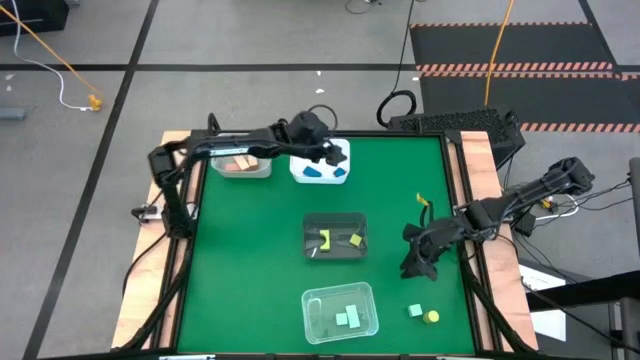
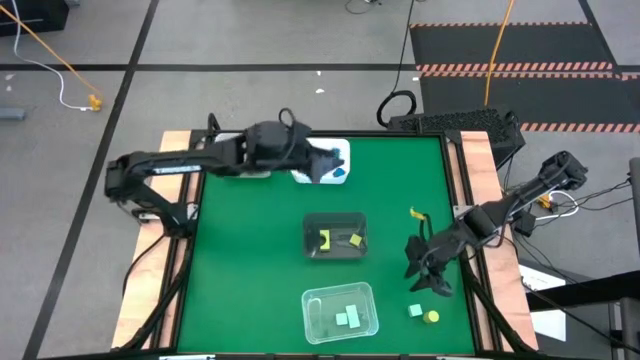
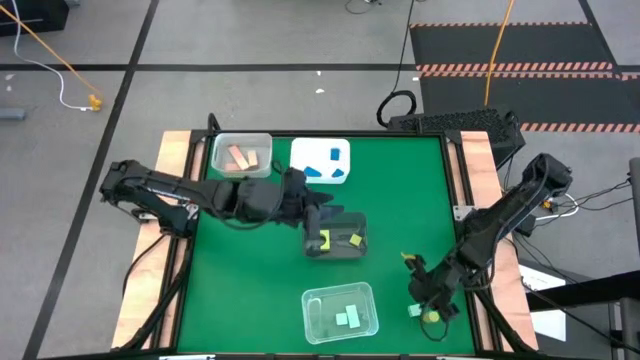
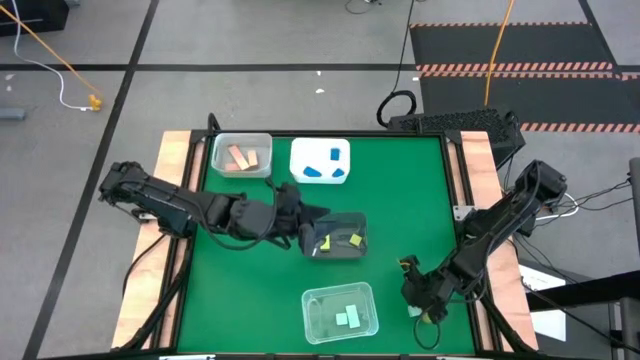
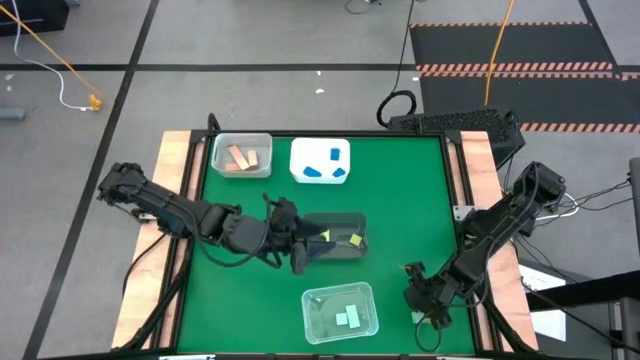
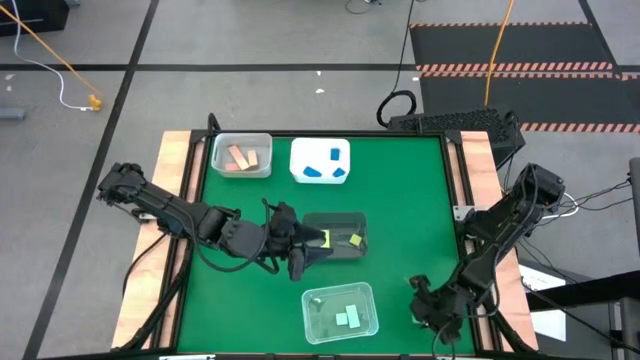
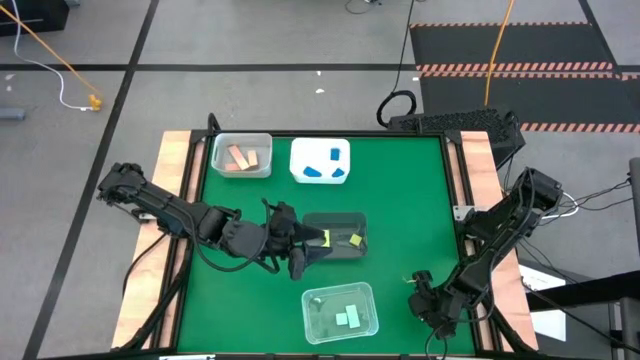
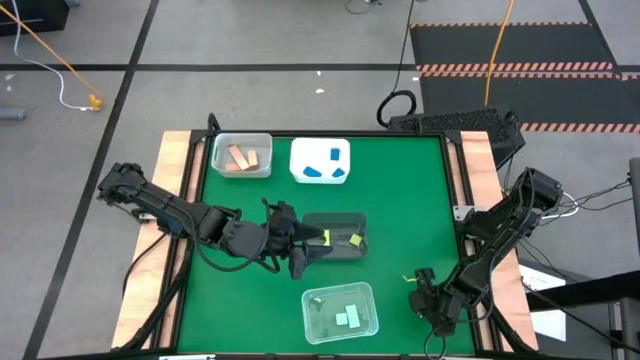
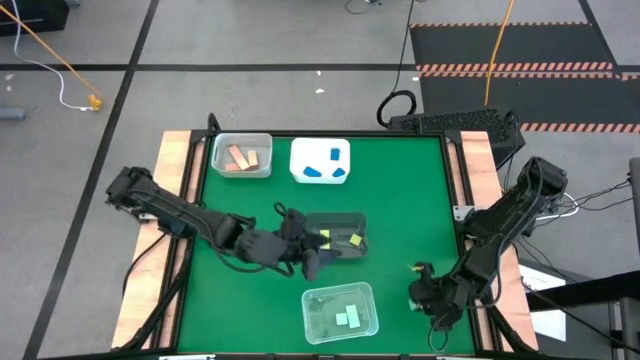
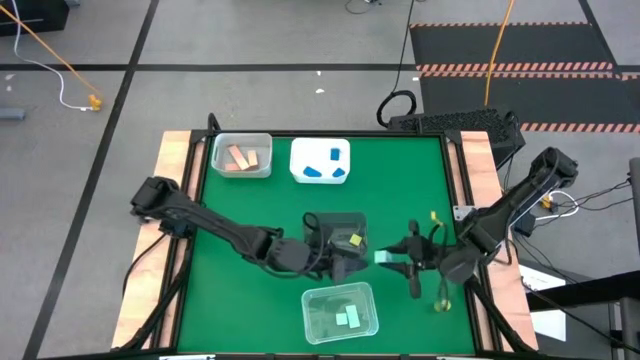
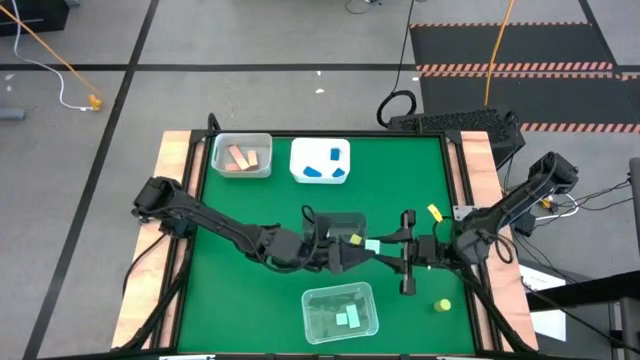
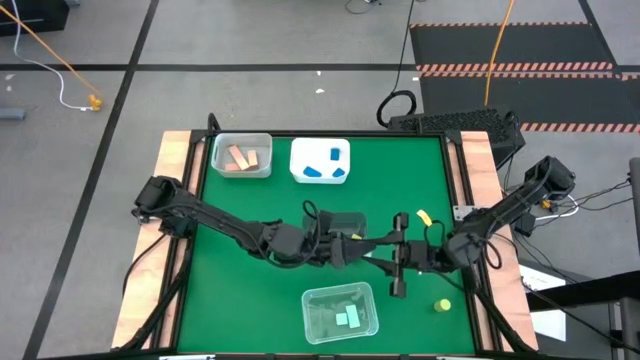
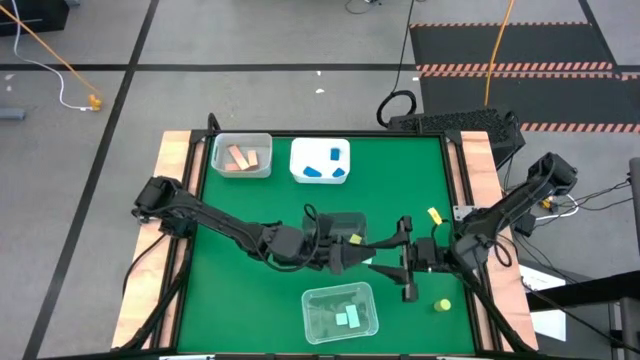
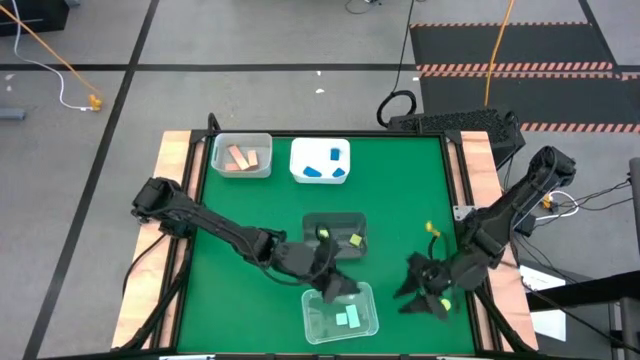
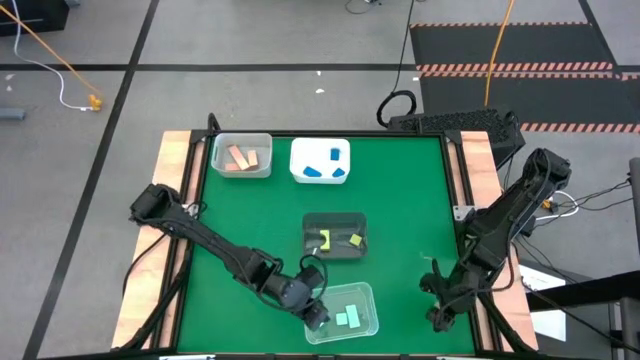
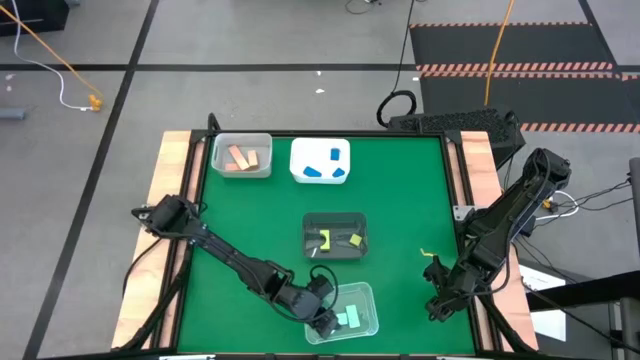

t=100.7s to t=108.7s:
Task: Sort & place blocks by color
Put the light blue block into the transparent bin

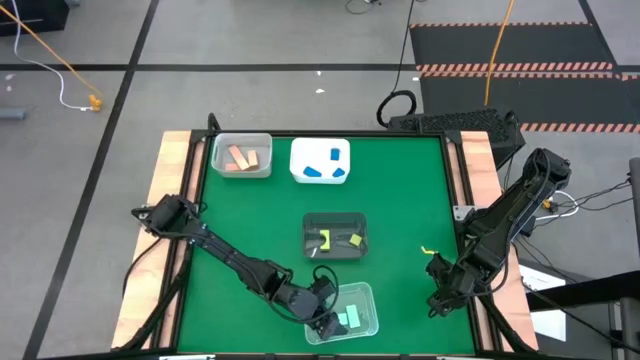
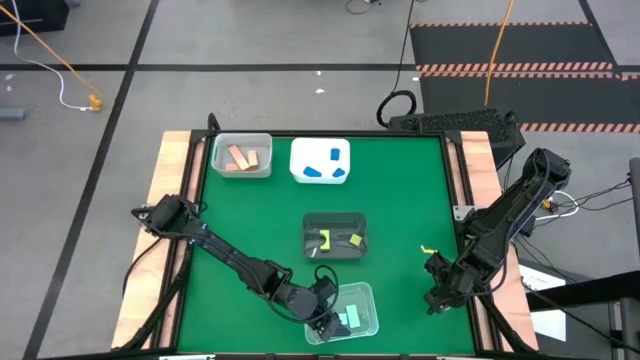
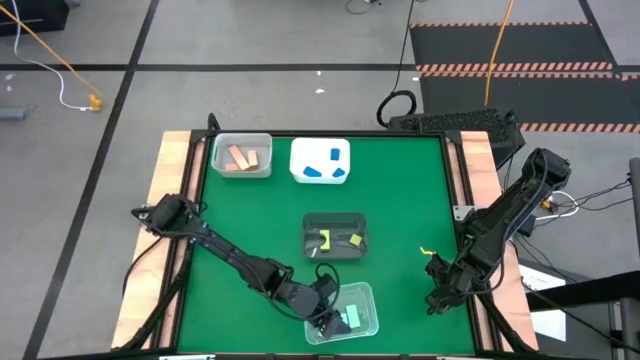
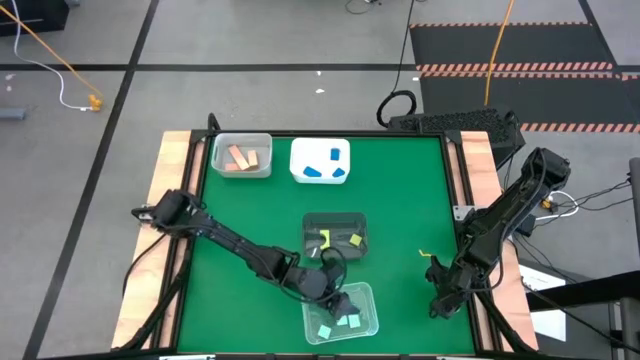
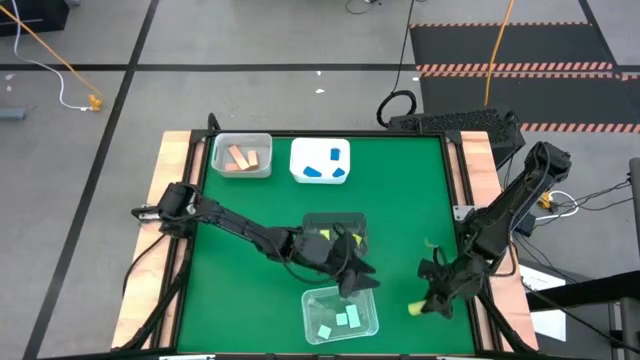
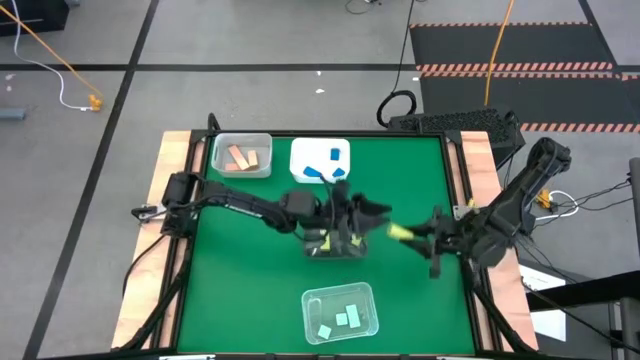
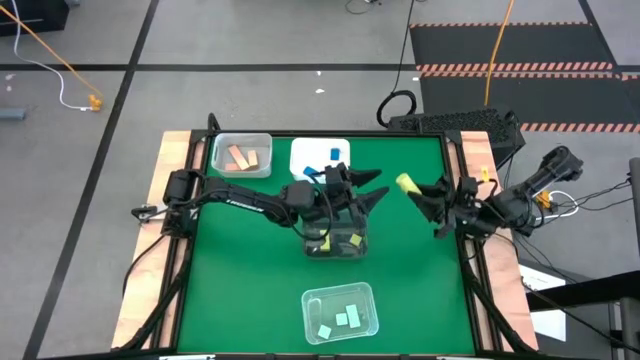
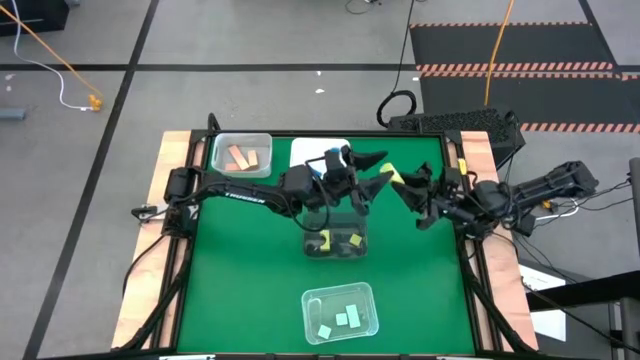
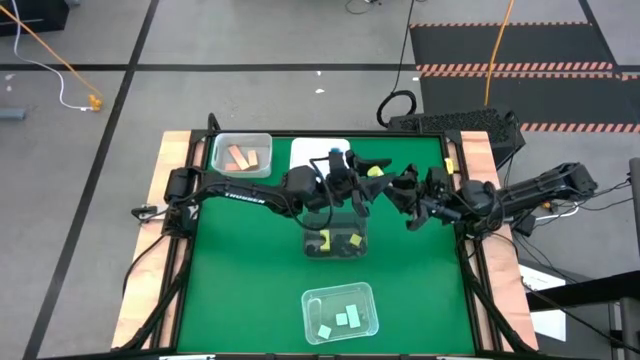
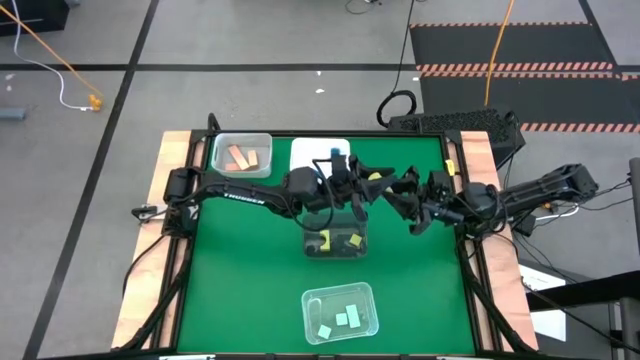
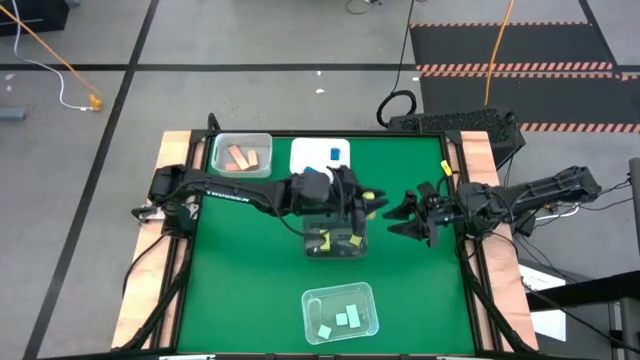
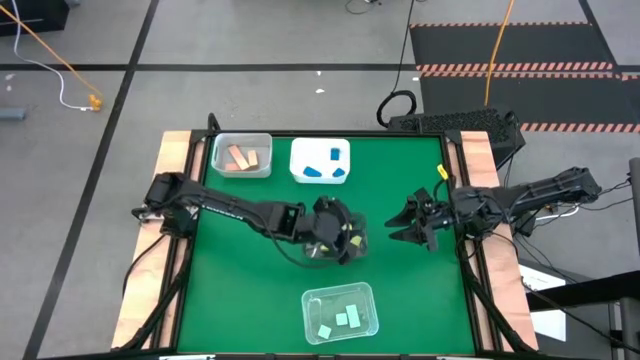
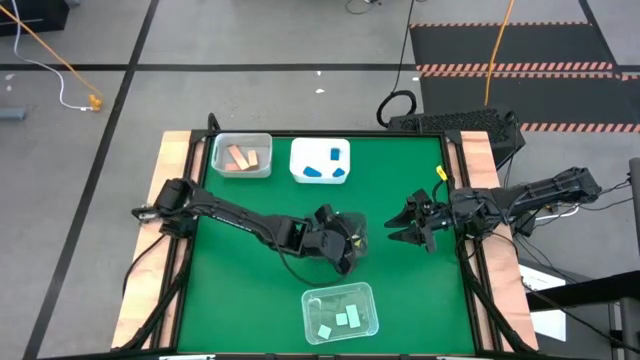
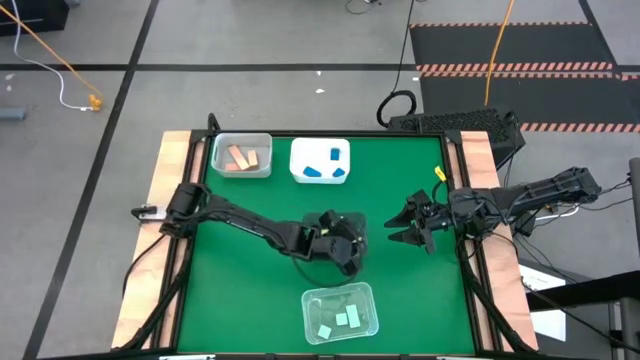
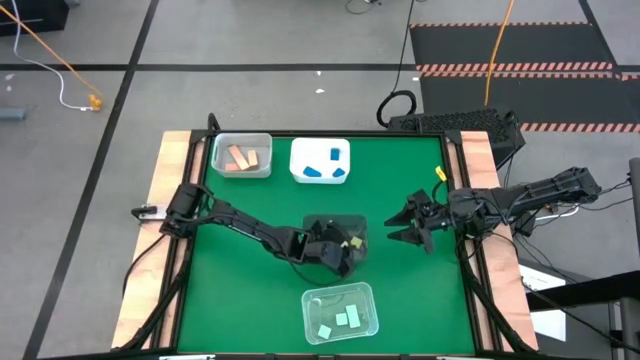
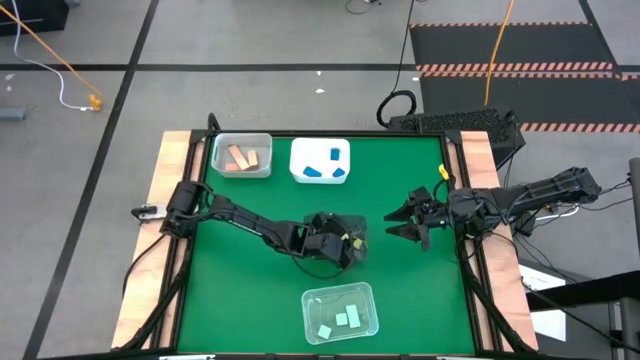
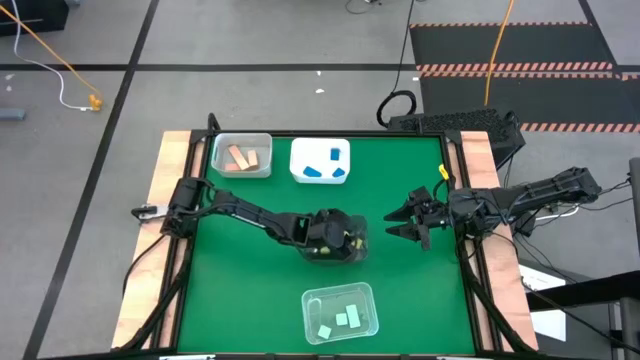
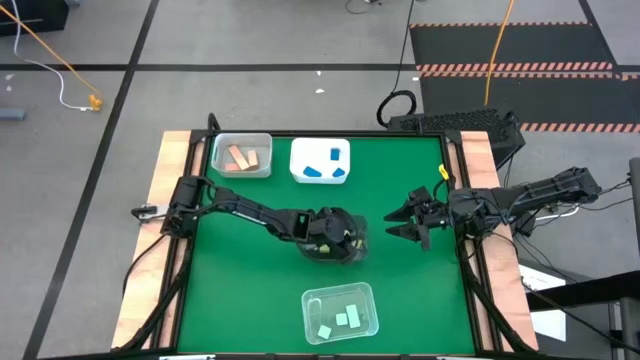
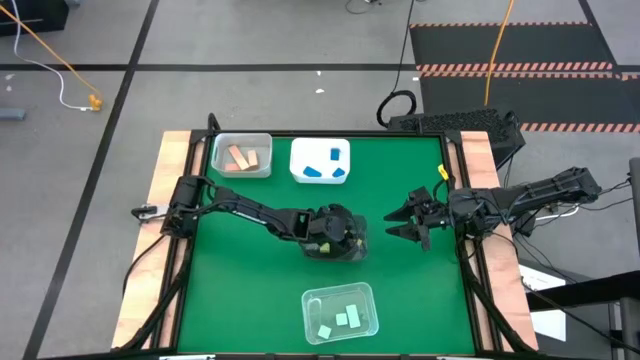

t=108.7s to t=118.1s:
Put the light green block into the black bin

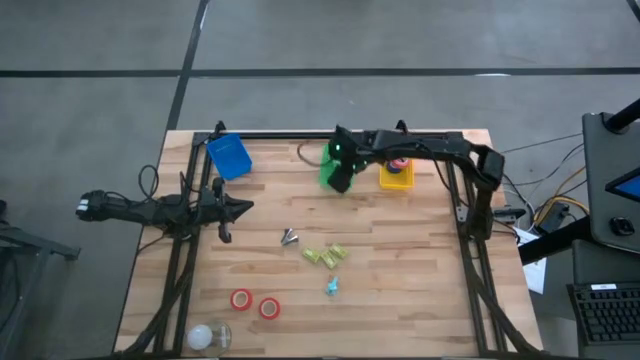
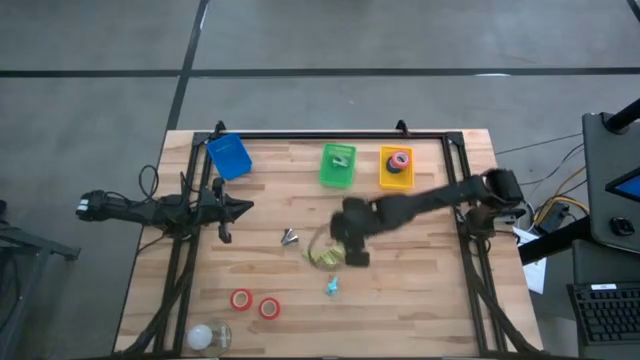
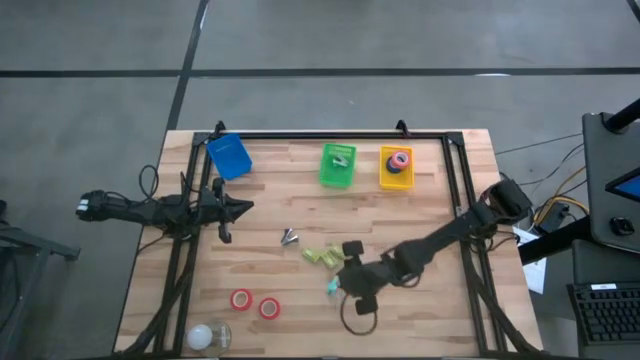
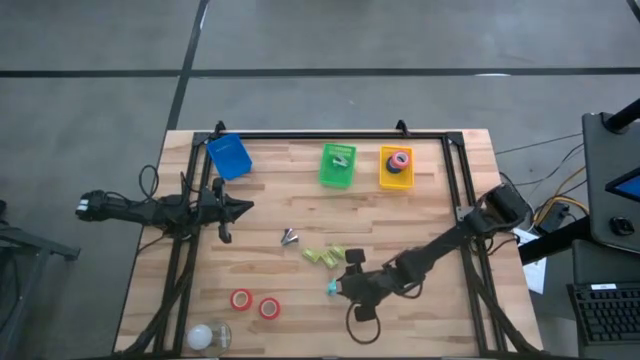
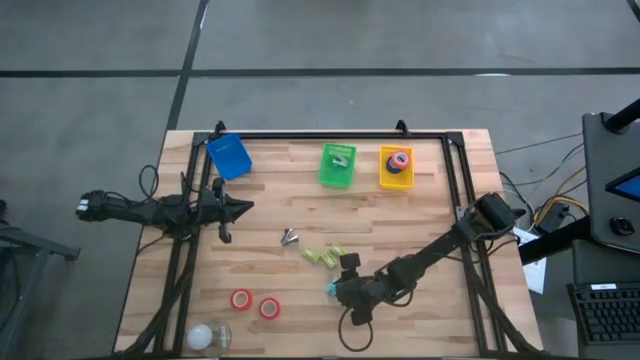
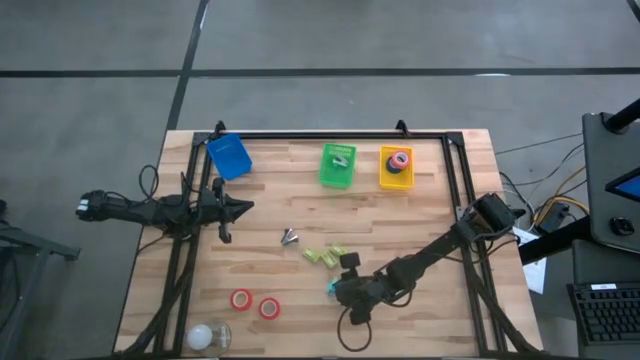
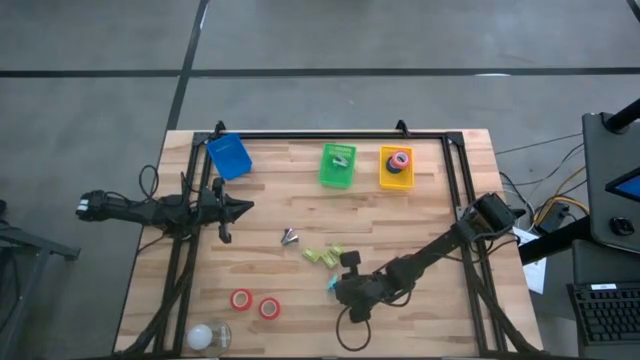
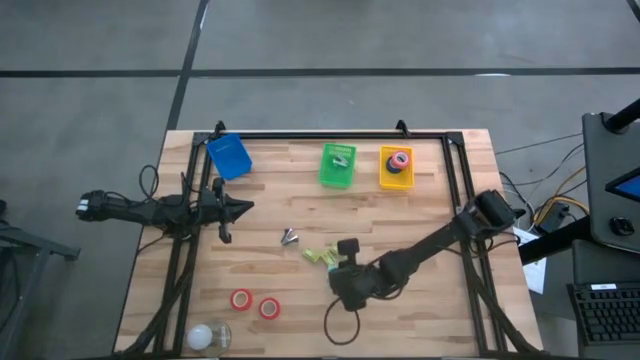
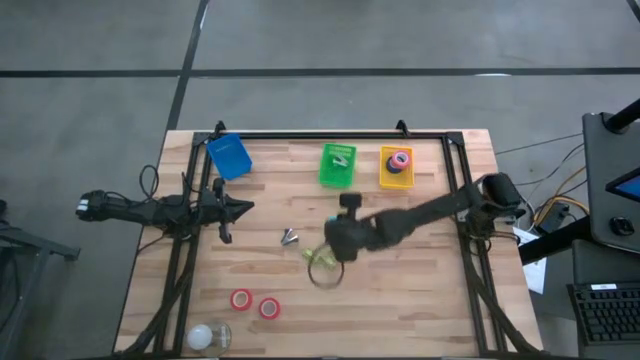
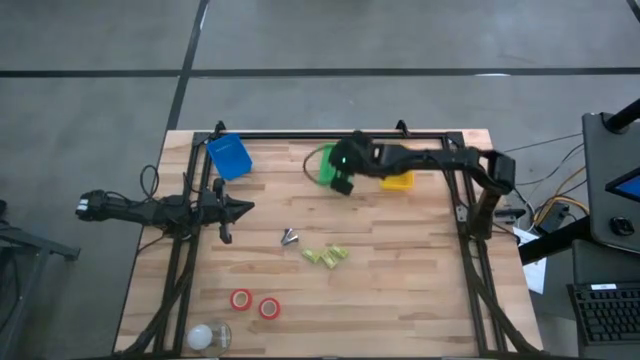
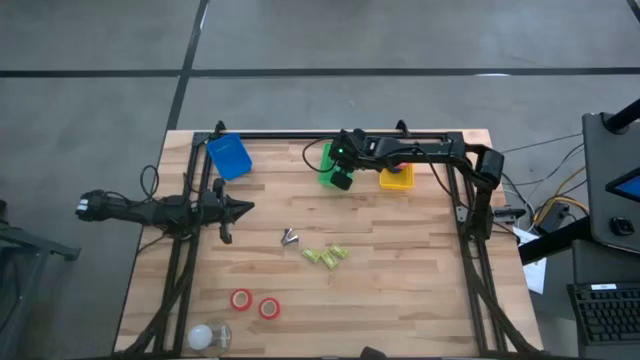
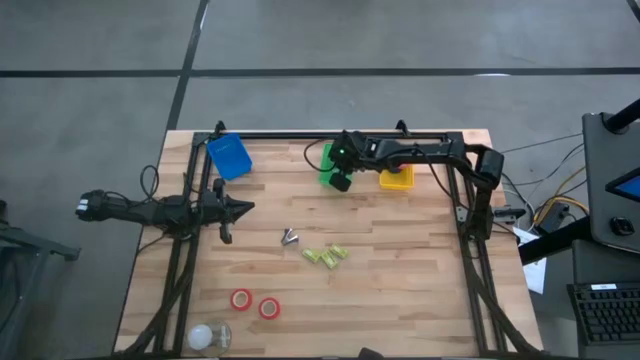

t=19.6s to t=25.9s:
Task: Pick and place Stapler, Stapler remover, tape
Put the light blue staple remover into the green basket
